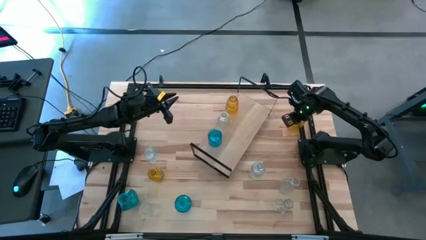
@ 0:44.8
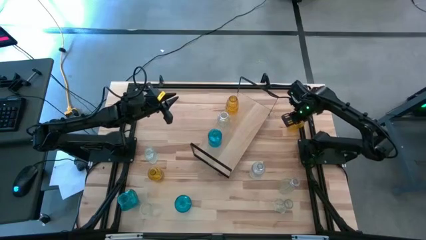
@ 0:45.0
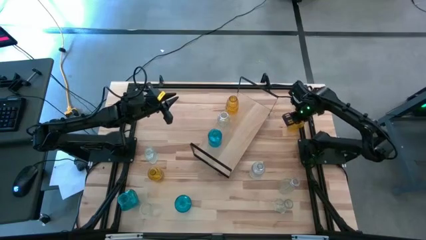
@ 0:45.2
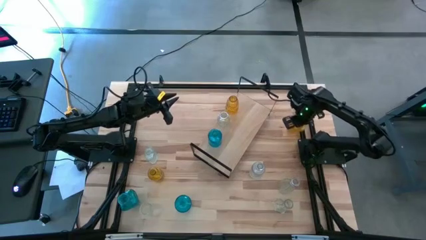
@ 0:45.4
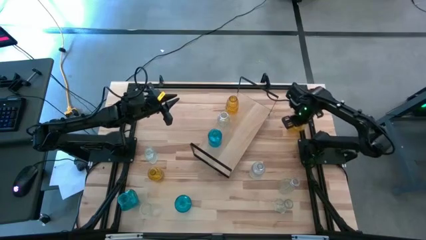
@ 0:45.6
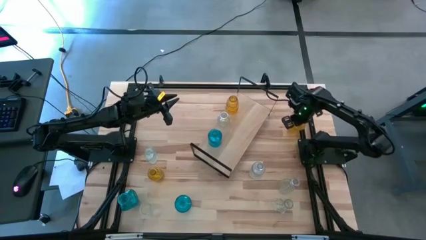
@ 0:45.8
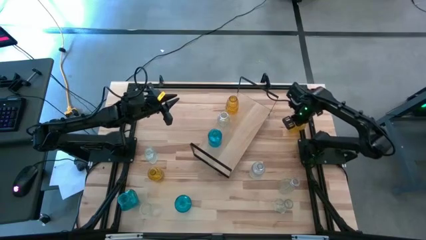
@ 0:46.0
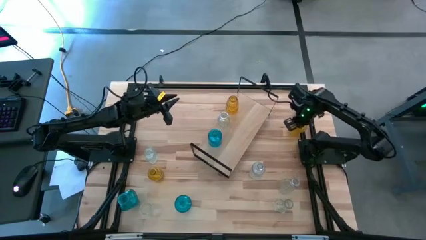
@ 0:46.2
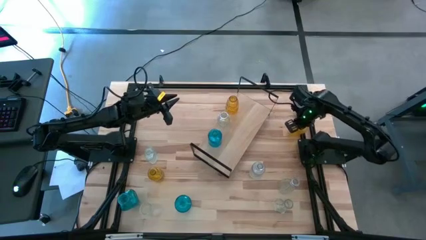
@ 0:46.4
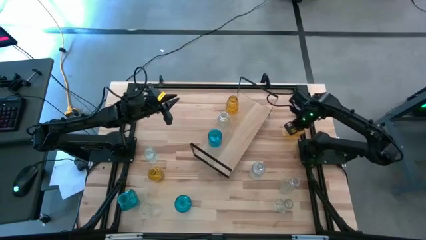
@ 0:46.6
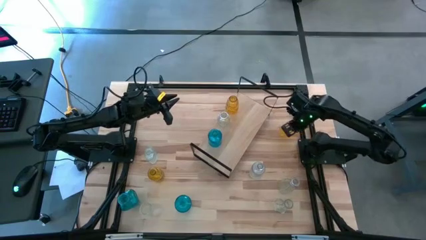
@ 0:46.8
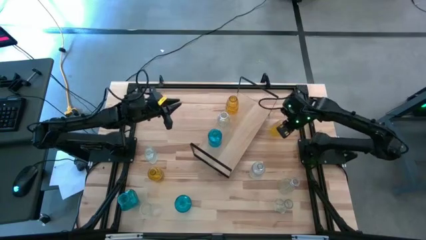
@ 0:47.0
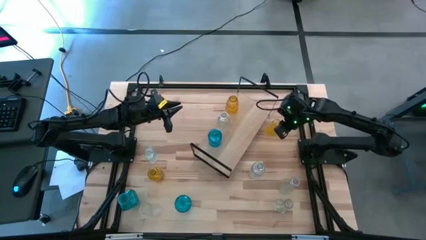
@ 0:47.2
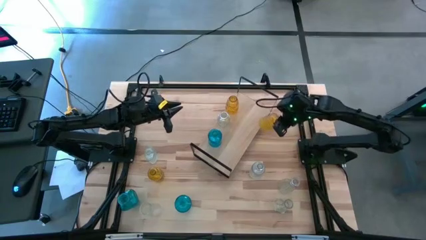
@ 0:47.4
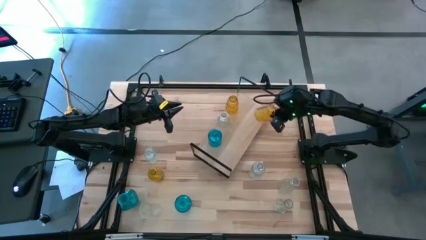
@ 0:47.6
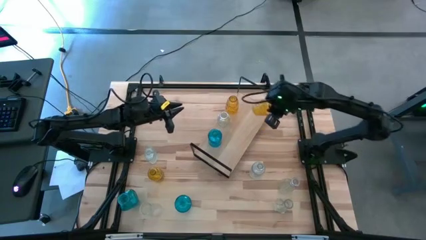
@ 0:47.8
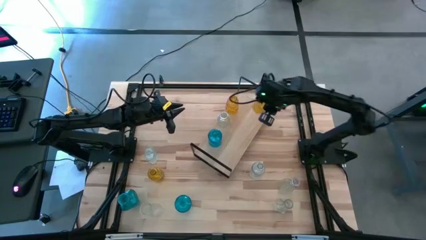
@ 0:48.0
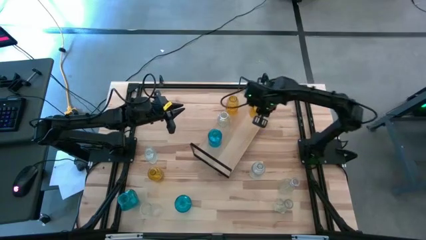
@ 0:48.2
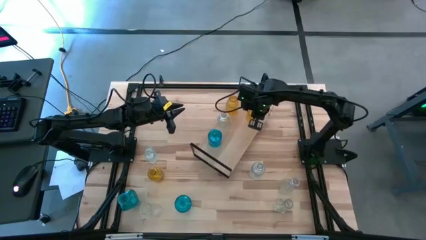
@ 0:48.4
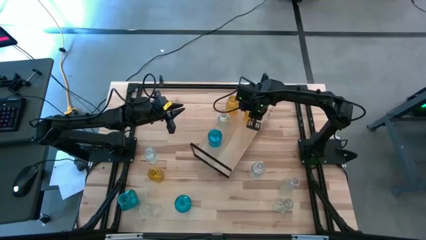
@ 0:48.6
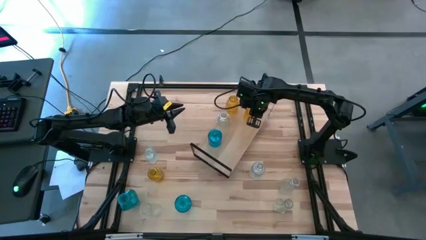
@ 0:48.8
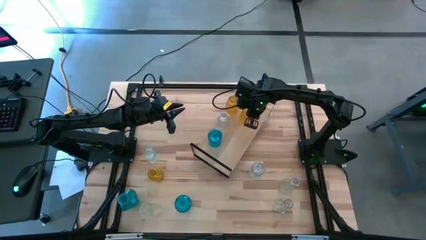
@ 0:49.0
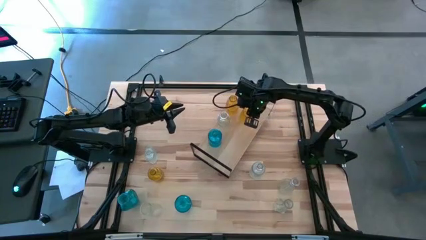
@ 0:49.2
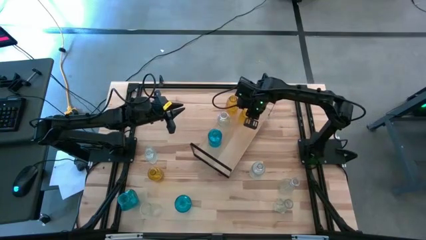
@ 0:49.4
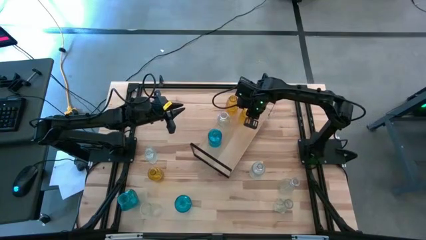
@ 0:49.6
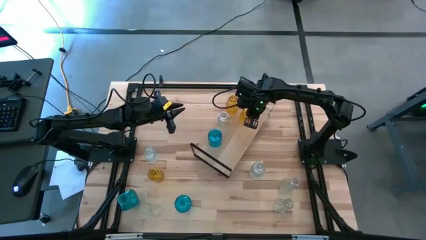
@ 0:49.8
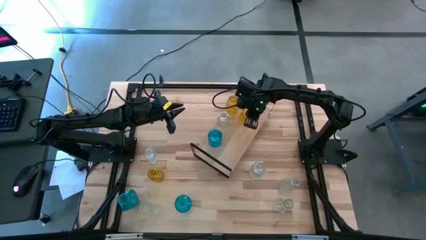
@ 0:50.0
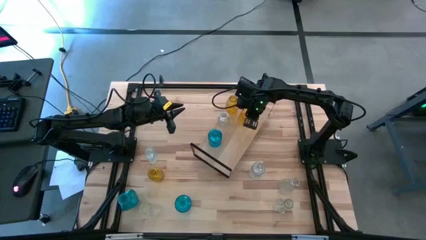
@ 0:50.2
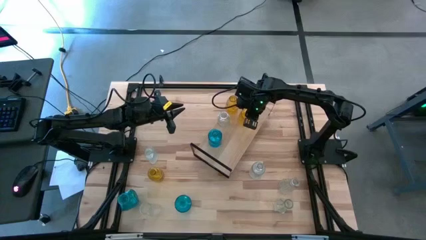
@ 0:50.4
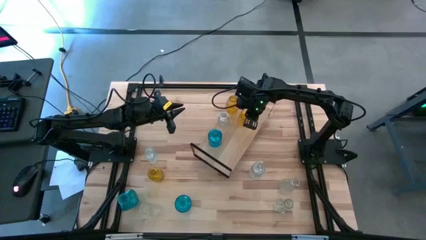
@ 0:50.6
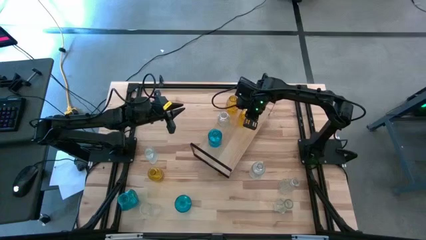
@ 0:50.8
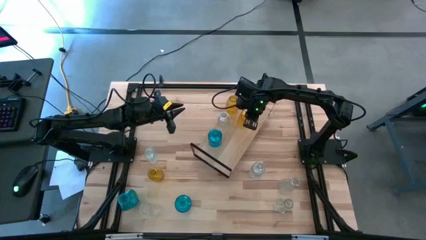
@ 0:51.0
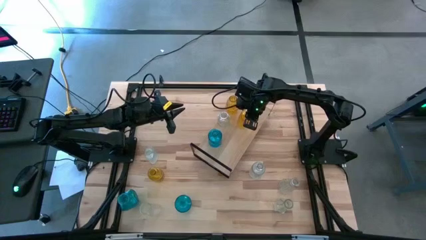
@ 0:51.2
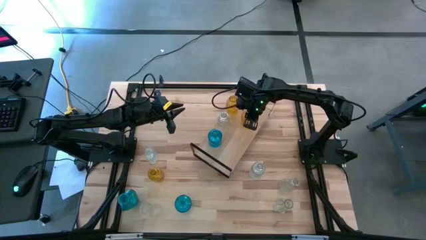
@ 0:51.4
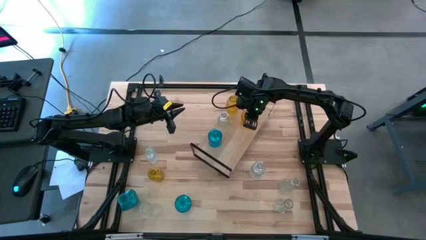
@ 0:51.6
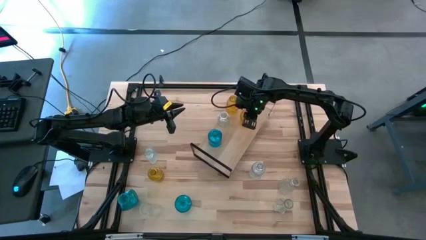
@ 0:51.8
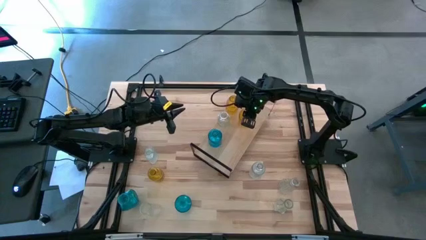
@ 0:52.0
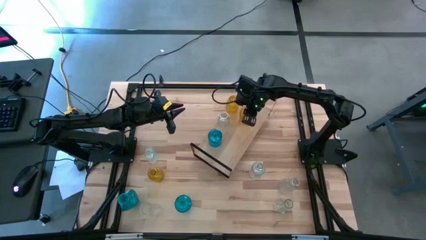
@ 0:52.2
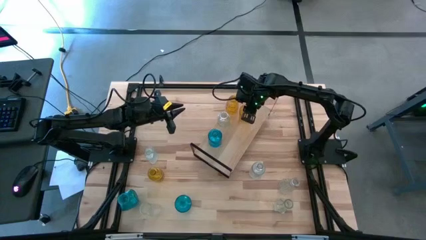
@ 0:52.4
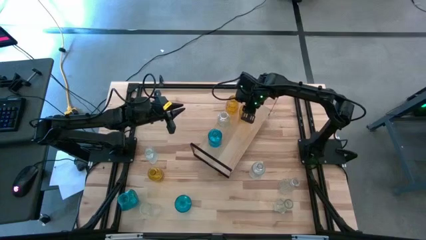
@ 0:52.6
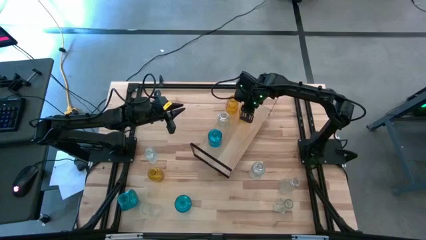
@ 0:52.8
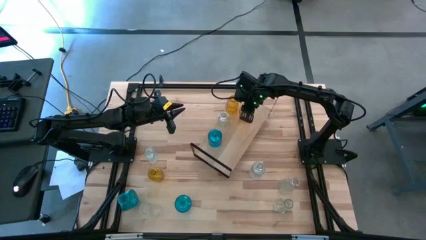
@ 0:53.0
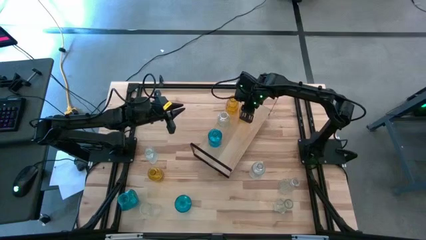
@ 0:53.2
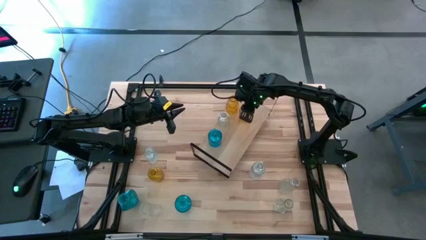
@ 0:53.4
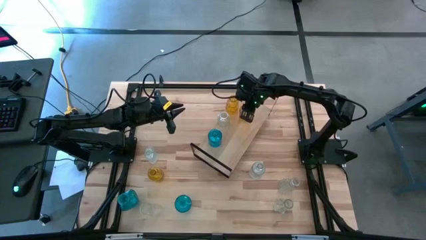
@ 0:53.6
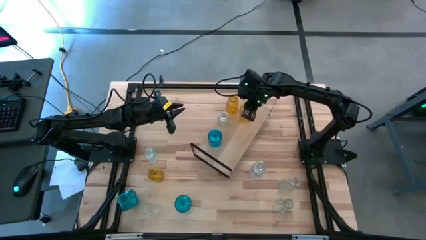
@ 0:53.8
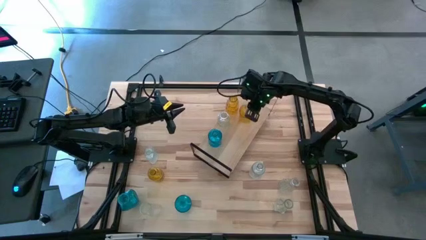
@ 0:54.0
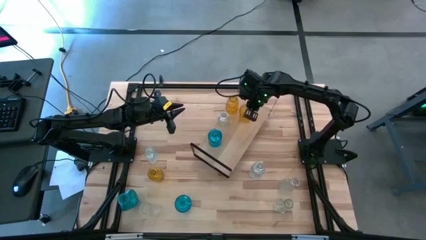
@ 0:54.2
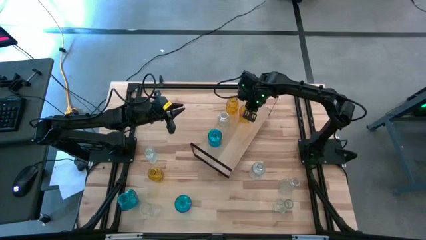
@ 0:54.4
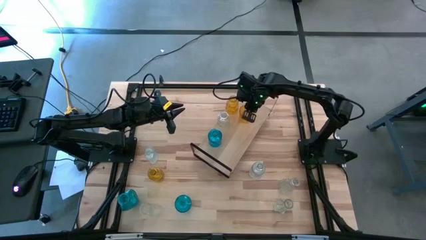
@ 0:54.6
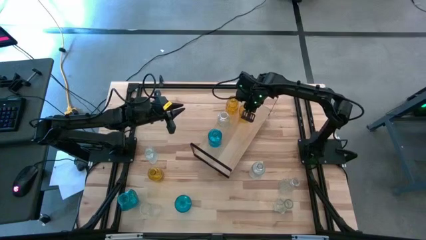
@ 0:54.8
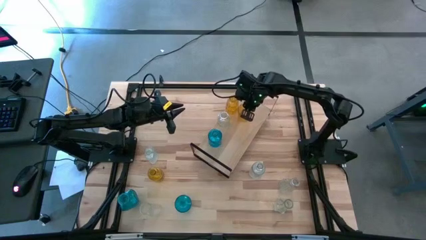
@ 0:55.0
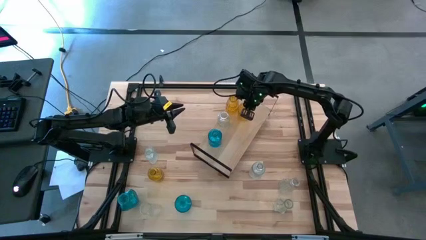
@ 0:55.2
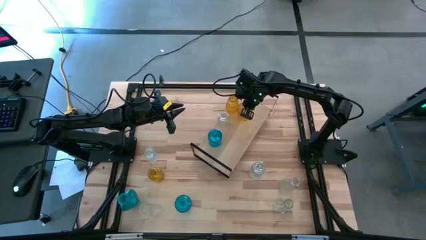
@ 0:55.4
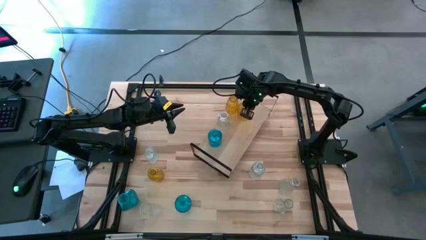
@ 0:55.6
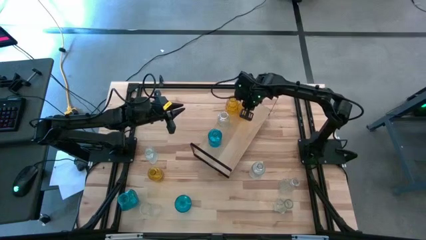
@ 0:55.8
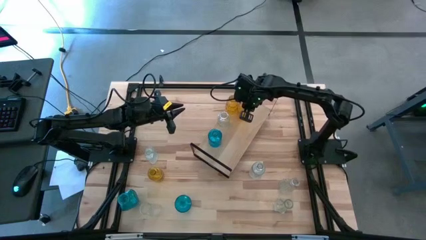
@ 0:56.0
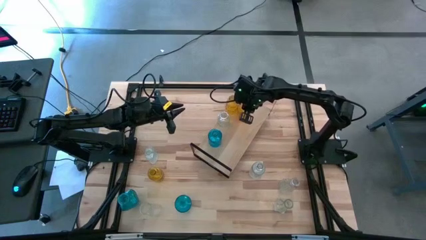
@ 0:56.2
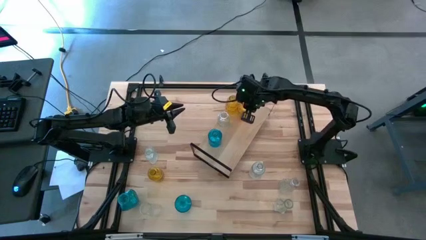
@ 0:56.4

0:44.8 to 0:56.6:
Task: sort vases onto shelf
Put the top yellow vase on the shelf and align with the other yellow vase
